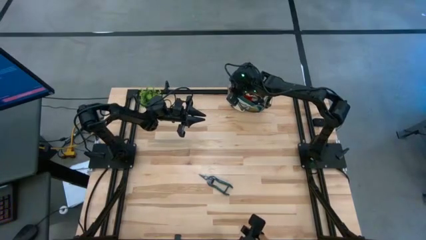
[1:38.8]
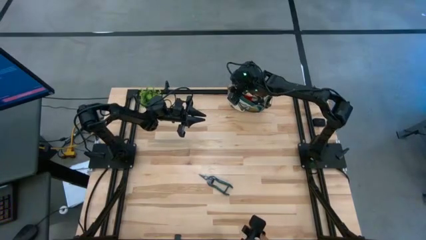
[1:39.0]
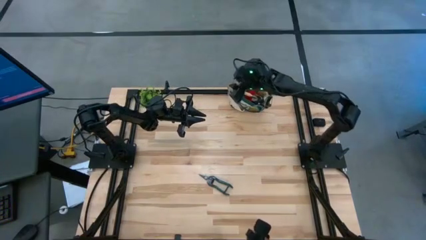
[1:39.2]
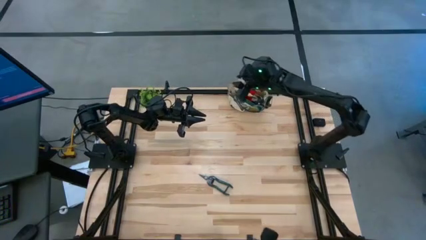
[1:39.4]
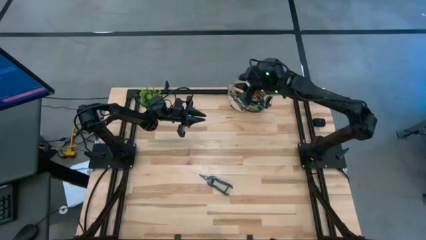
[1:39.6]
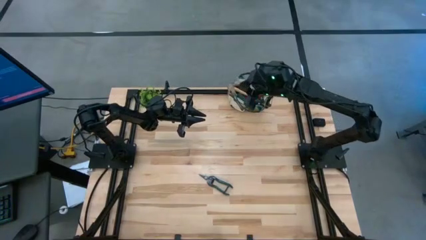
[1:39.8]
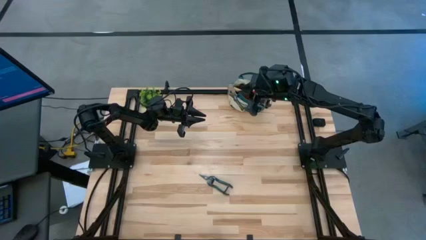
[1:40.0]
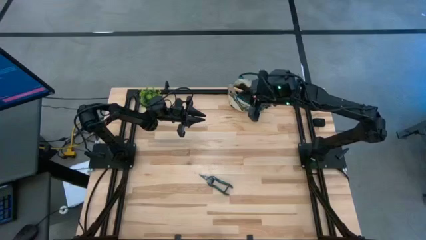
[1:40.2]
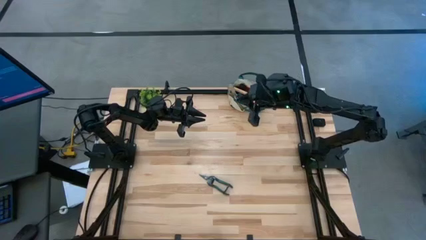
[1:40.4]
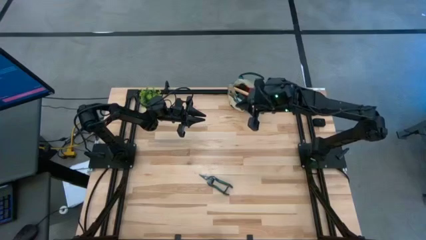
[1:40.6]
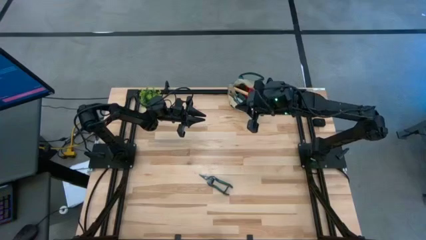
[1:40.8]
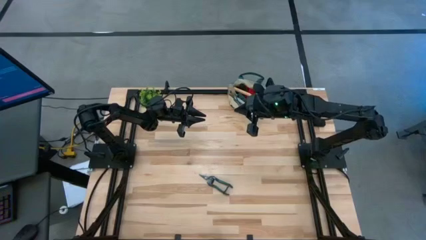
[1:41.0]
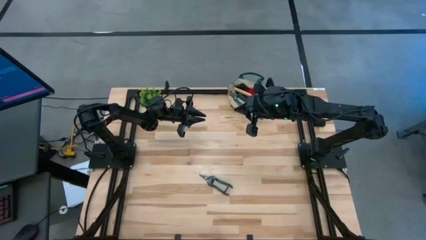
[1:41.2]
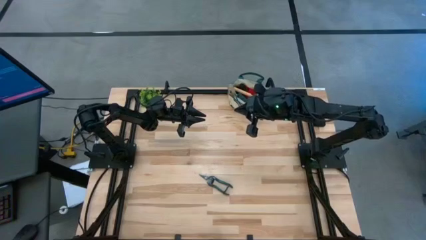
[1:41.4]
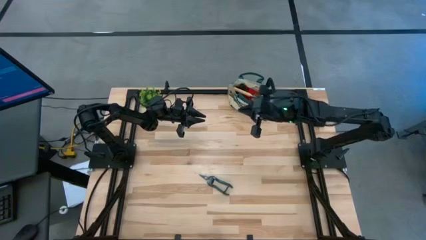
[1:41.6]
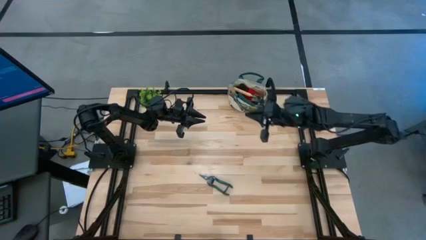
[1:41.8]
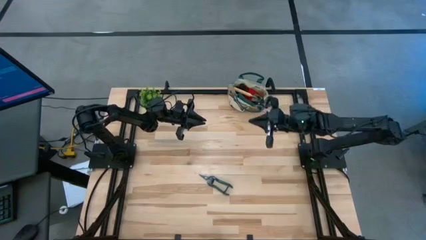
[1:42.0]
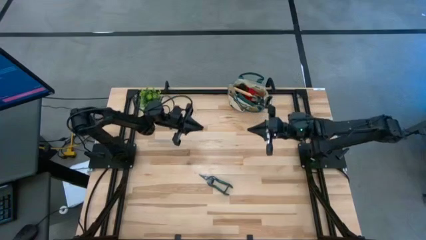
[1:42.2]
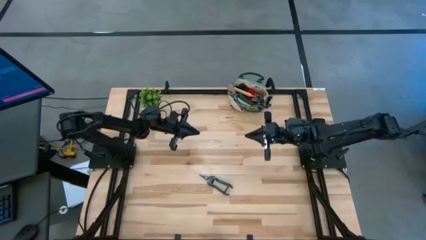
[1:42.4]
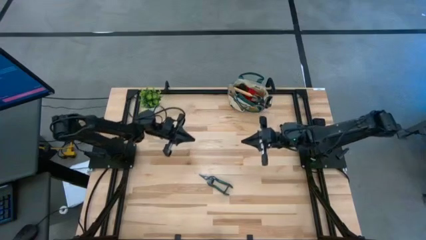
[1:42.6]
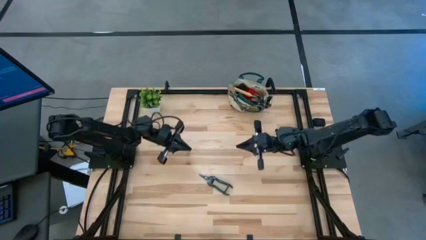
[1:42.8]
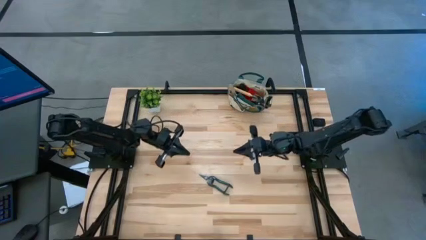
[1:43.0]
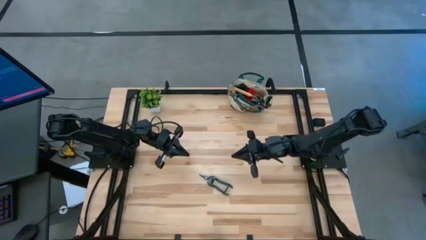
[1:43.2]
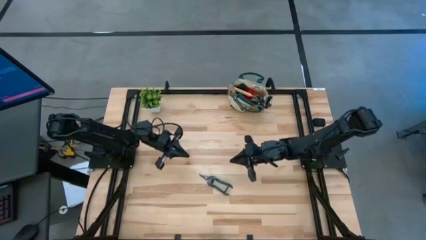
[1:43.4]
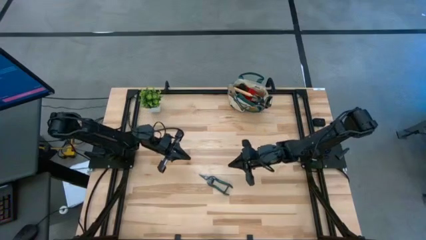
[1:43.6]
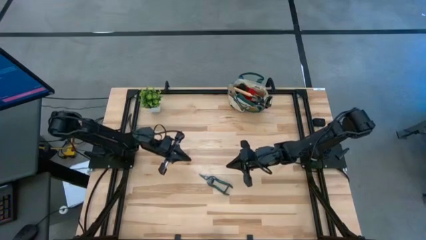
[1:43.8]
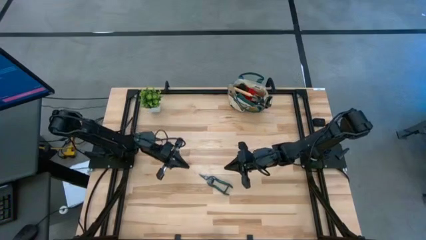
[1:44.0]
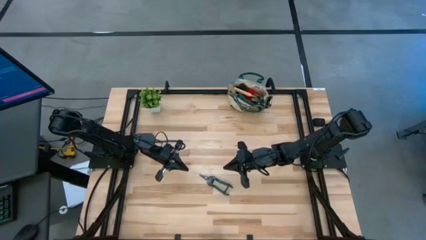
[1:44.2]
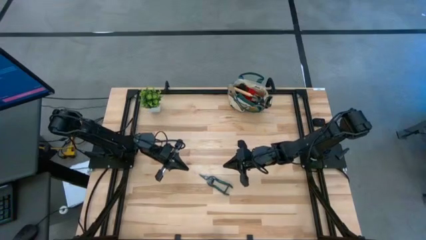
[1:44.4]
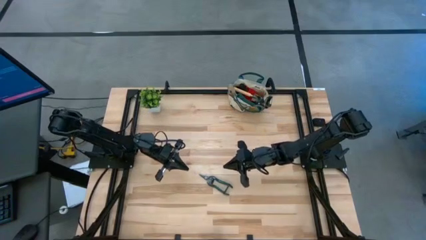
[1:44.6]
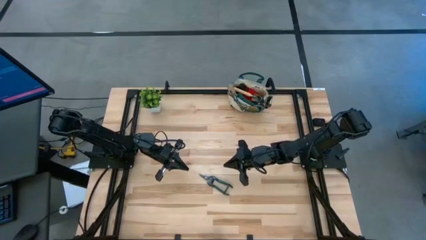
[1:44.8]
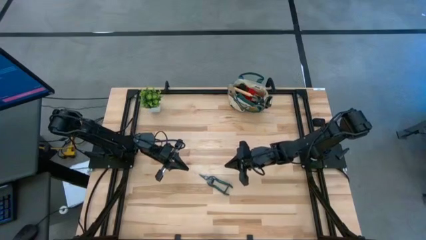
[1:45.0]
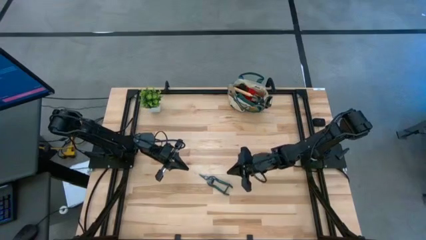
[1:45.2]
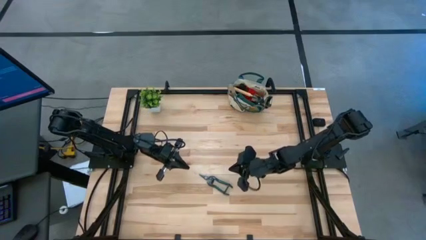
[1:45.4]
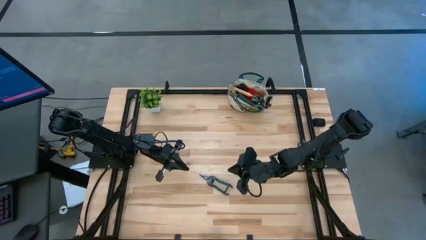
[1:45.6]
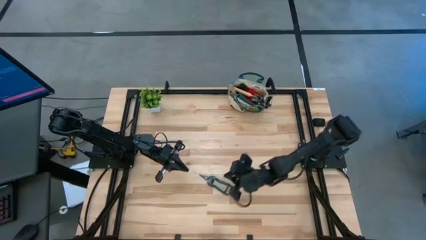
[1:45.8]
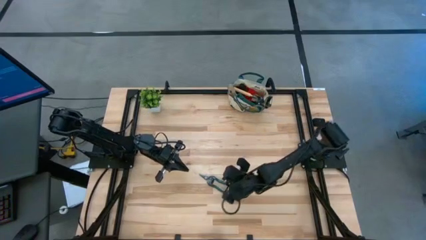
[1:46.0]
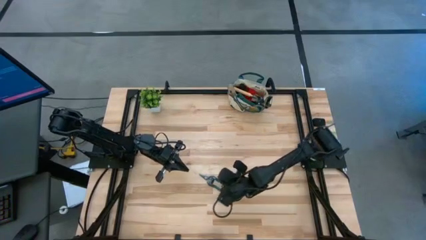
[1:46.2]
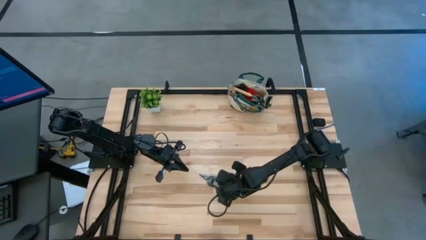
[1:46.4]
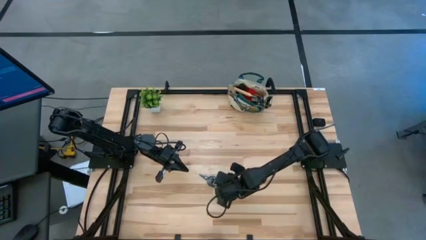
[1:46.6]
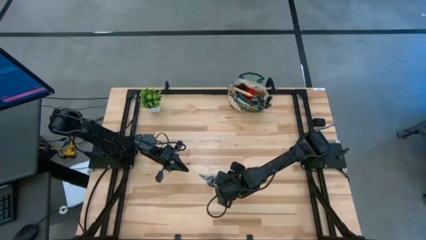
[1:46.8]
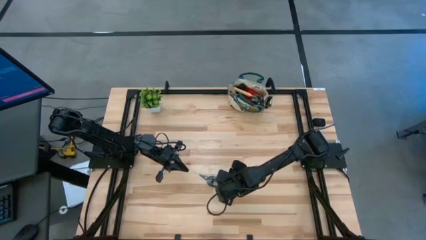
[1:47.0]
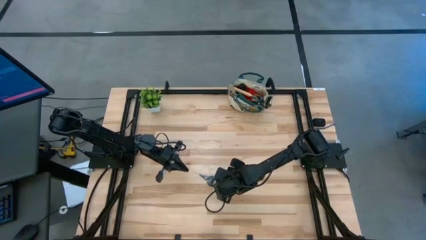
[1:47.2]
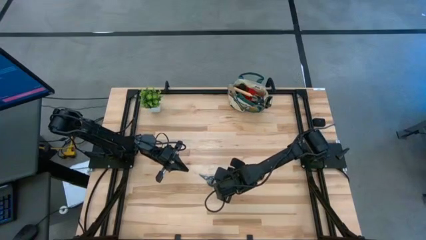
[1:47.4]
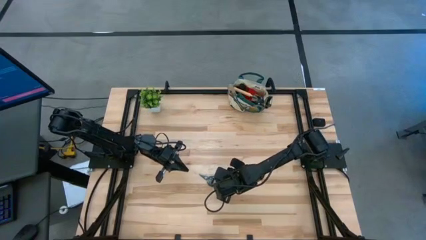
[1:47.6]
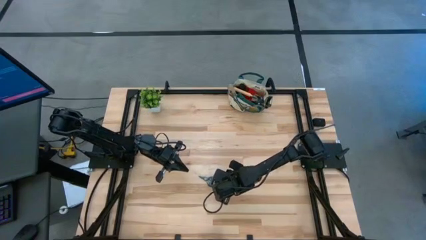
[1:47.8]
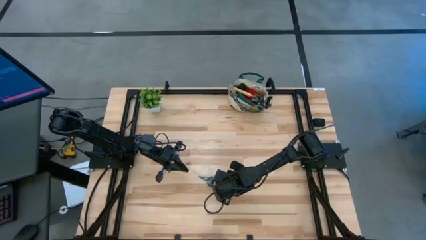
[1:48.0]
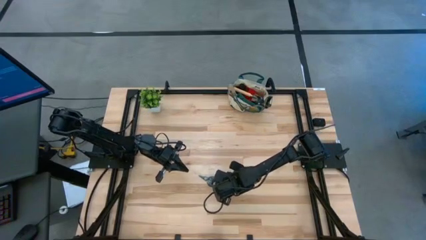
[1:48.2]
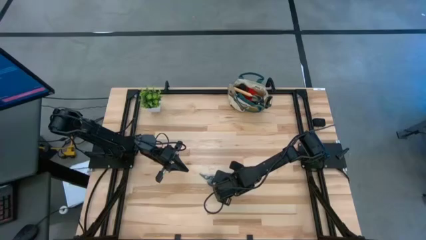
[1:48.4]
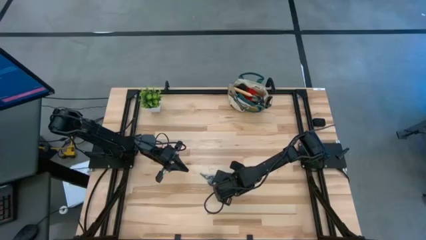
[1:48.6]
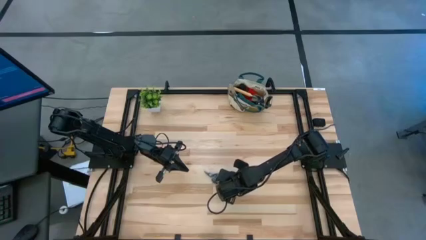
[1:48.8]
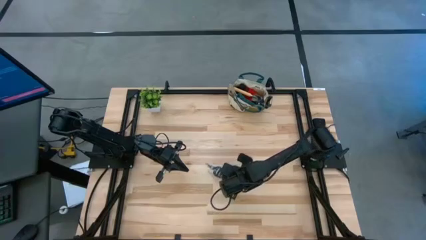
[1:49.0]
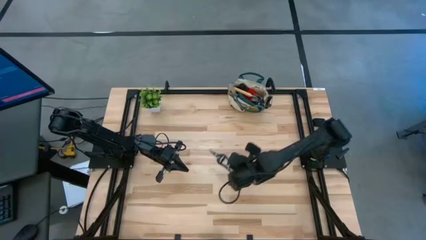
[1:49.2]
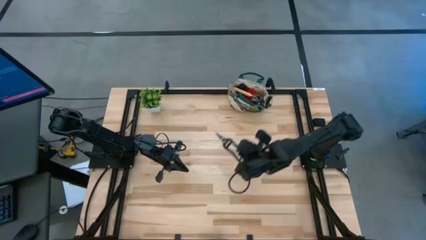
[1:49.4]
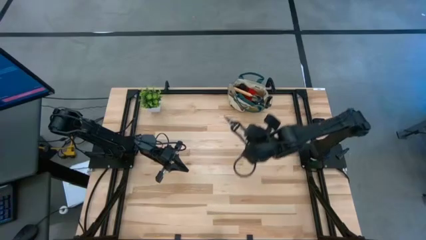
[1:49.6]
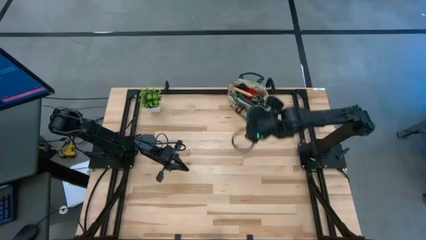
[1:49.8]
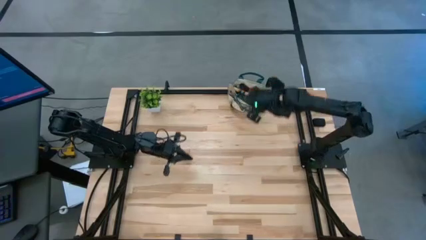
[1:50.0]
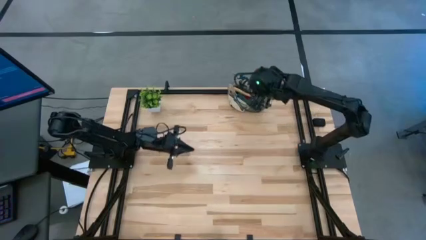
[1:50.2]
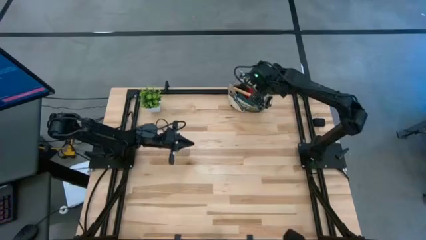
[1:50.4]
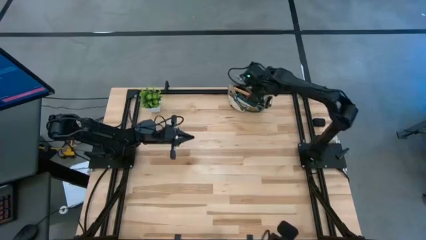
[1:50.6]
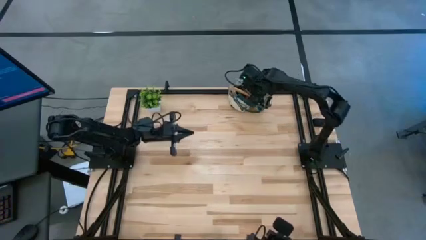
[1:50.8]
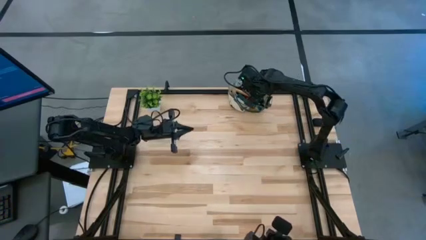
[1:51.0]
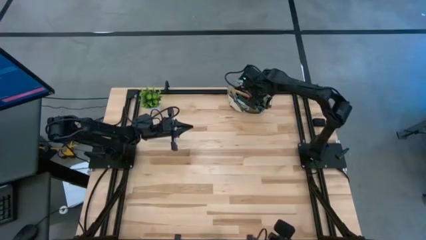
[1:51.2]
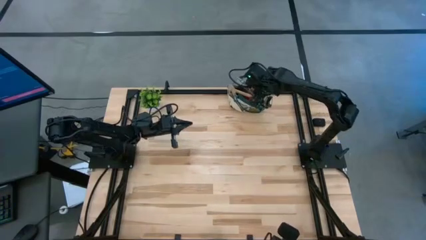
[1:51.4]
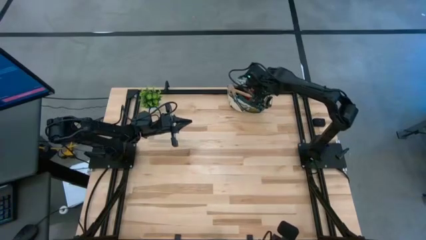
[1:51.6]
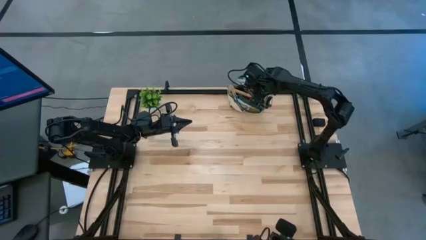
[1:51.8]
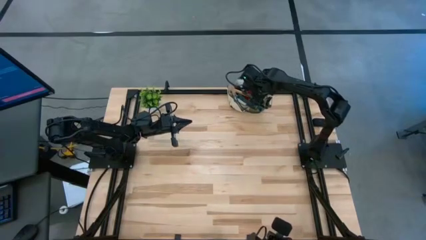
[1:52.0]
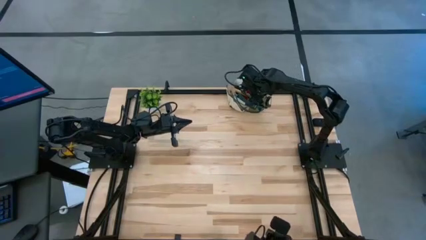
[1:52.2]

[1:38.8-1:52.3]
Task: Pick & Place Garden tools in Gardening bag
Put the green shears into the gardening bag

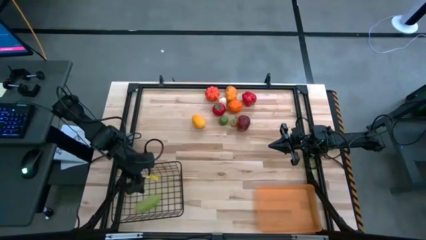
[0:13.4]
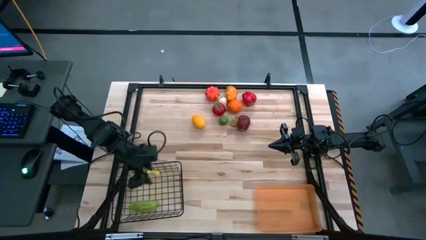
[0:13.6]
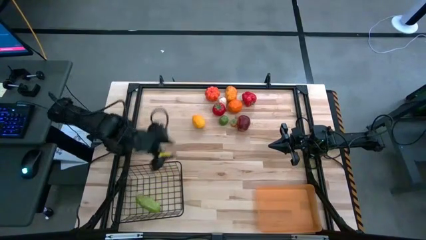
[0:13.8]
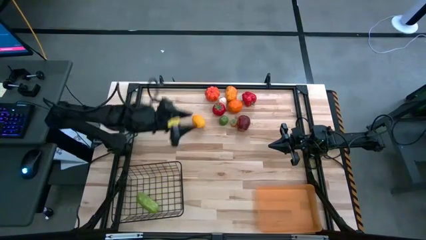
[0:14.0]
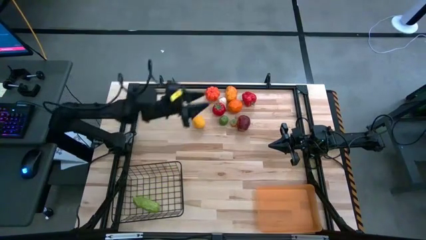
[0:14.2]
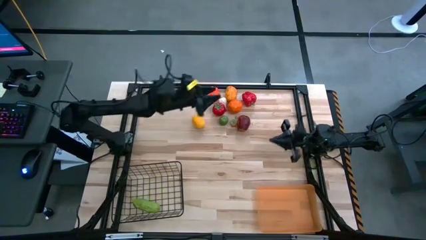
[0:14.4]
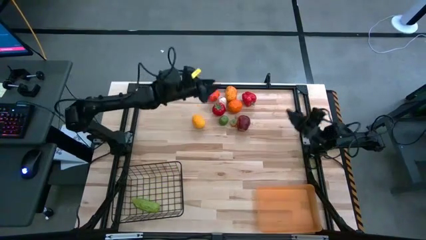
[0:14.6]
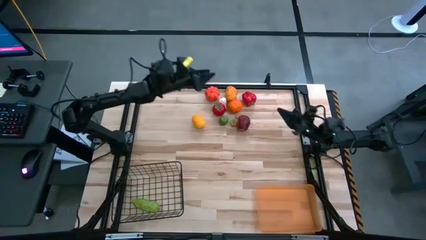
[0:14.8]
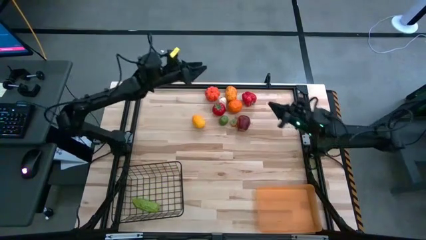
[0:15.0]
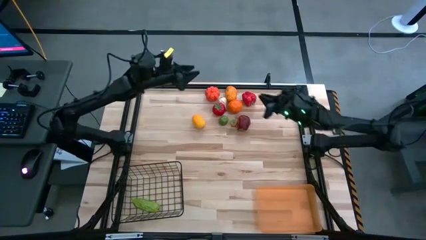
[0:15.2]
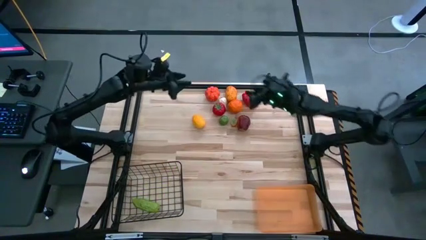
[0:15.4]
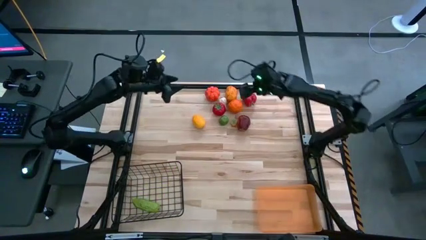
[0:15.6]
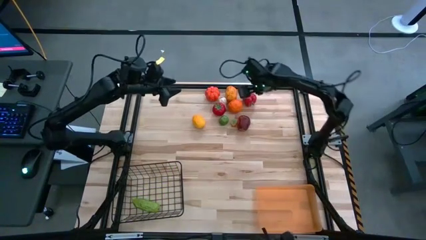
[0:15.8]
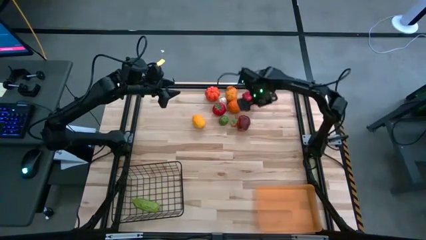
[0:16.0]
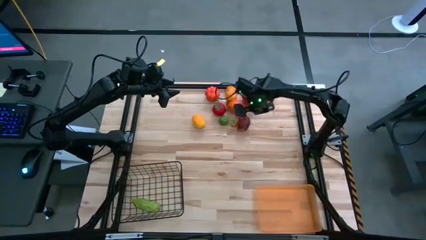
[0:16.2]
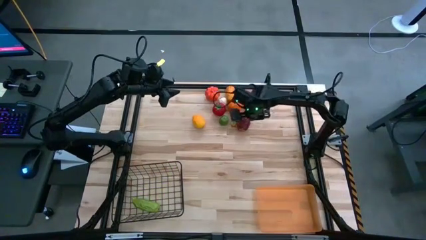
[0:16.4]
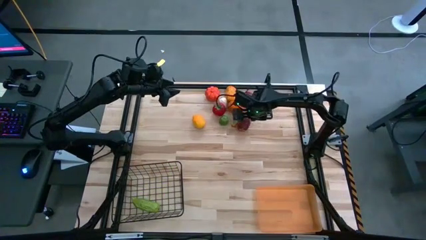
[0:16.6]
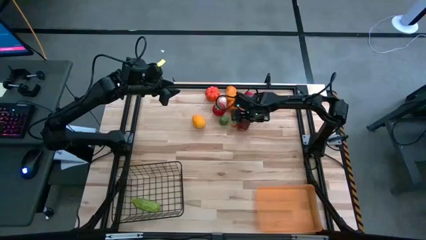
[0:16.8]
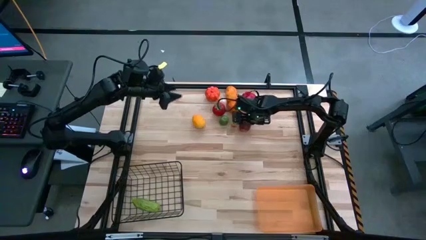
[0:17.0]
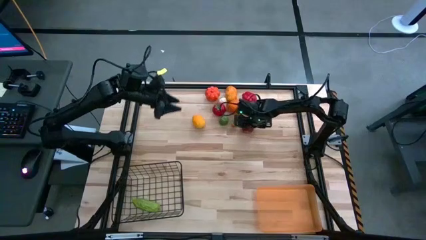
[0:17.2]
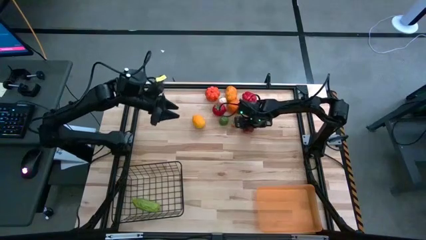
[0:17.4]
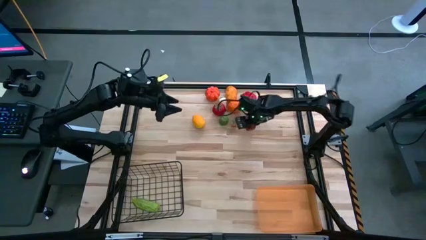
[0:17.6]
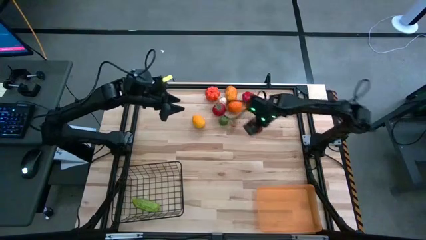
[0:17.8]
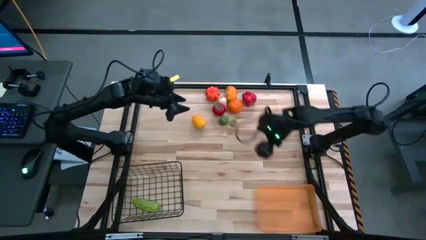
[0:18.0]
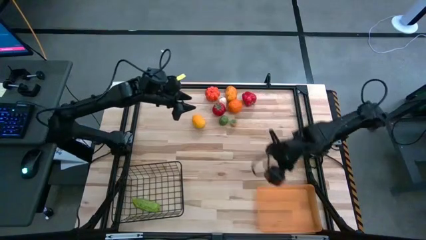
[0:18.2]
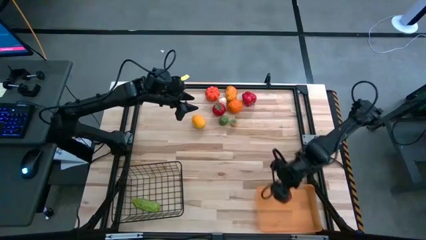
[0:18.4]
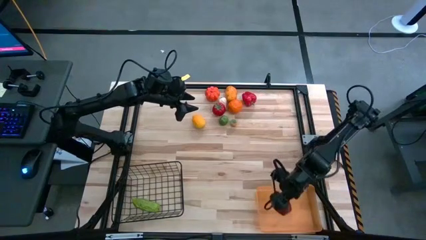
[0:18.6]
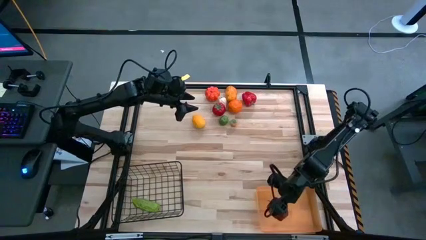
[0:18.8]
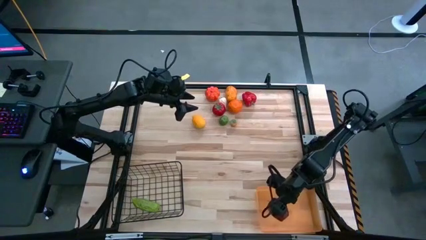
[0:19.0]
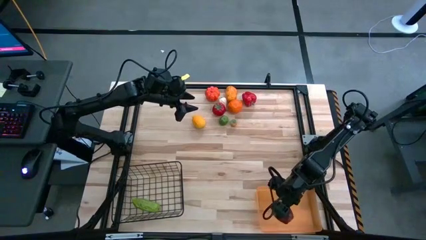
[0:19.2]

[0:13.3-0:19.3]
Task: Sort produce into baskets
Put the red apple into the orange bin
